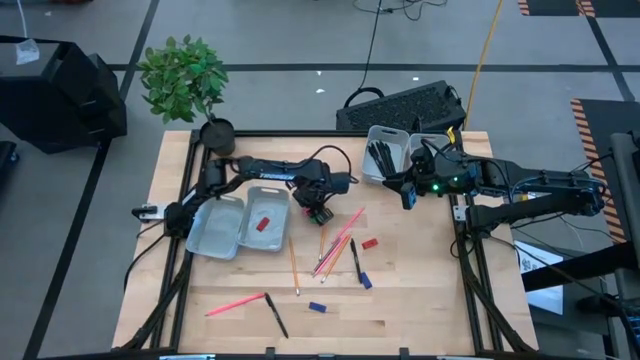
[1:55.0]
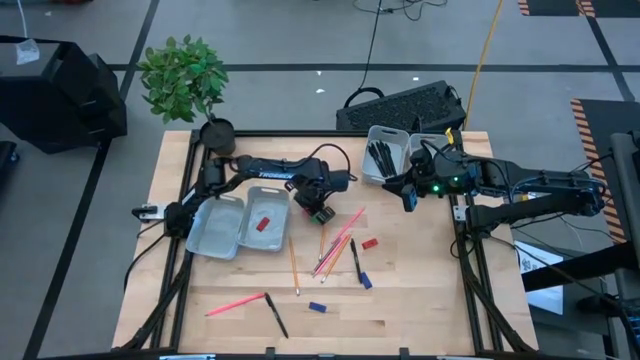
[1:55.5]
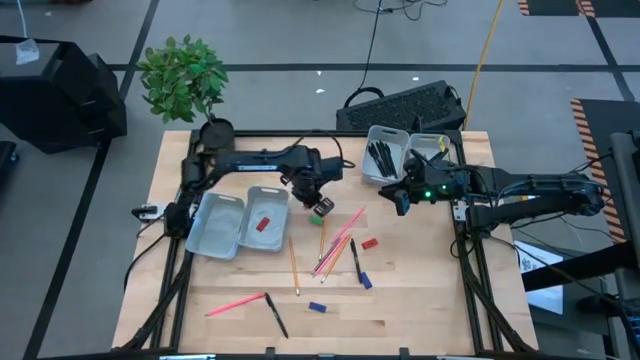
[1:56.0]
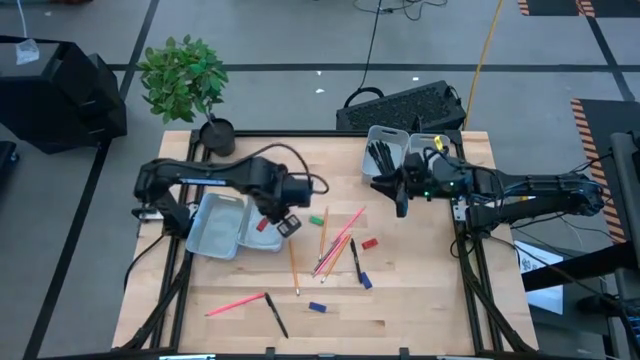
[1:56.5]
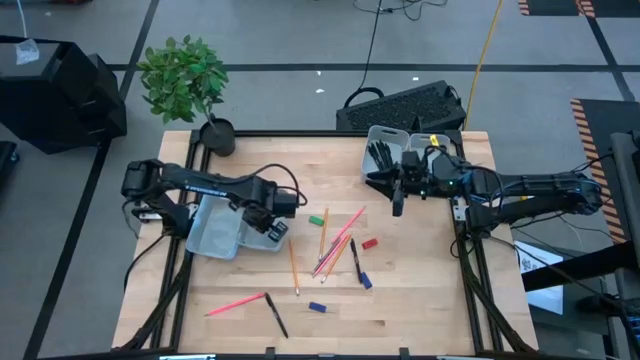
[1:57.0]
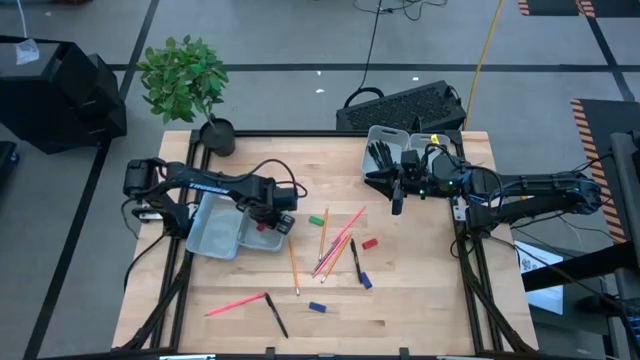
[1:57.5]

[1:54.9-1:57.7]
Task: Sort crayons/erasers/pens/pencils in bins
Put the pink eraser into the bottom right gray bin

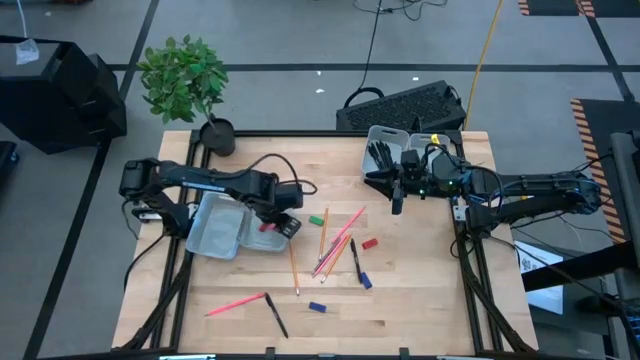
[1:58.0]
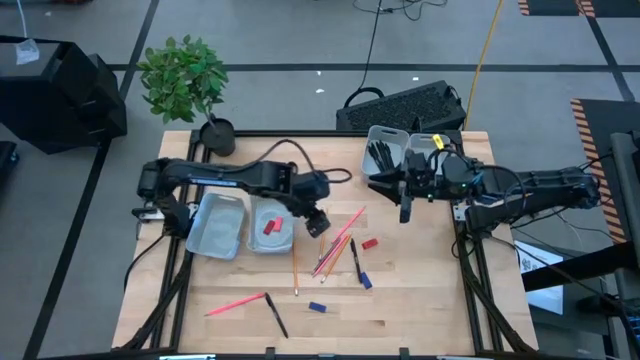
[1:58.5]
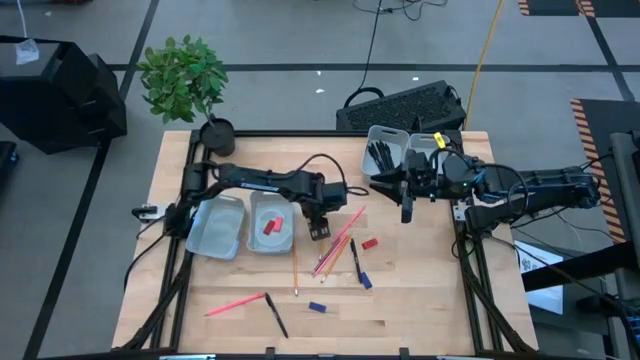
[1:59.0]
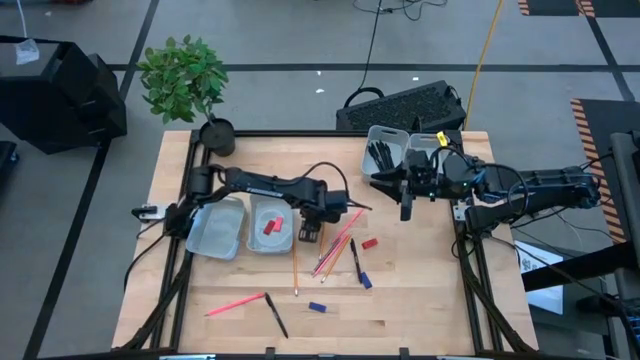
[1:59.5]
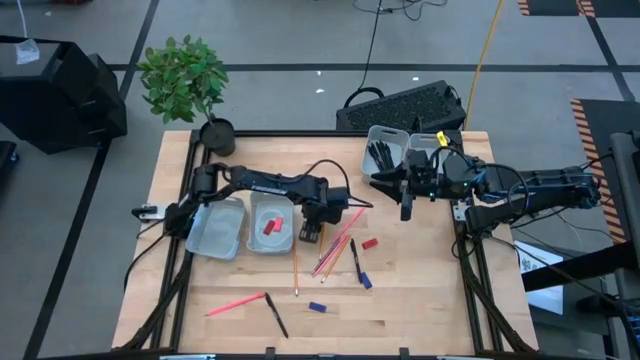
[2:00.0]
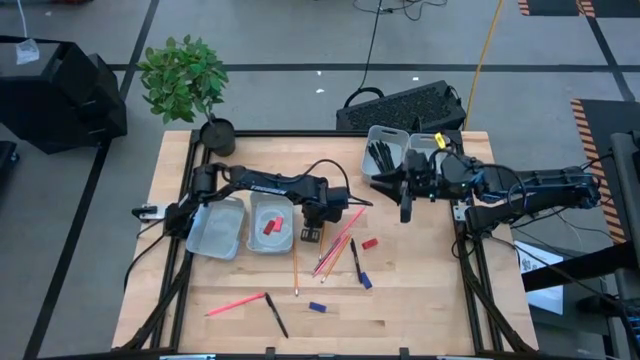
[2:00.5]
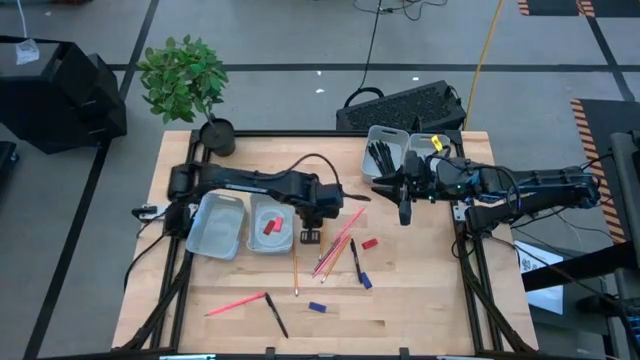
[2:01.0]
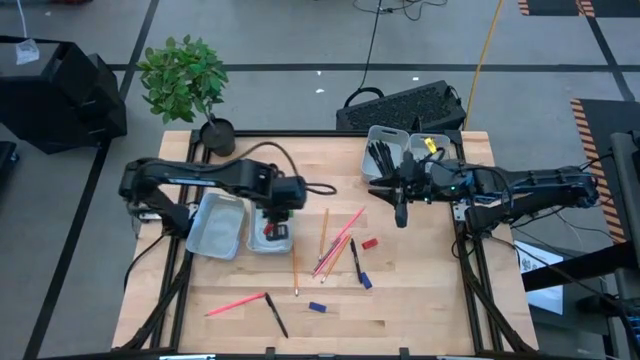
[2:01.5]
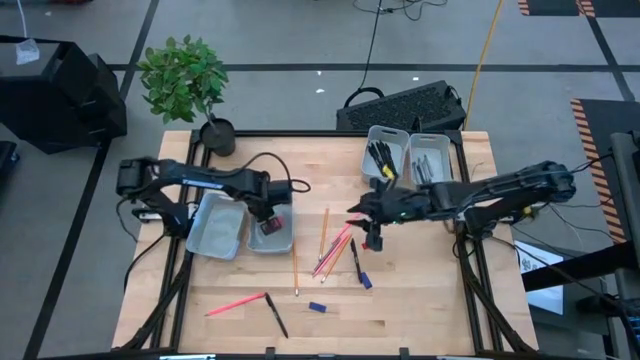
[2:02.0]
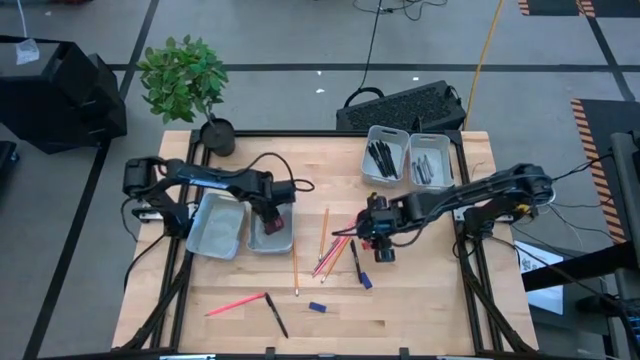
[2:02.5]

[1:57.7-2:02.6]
Put the green eraser into the bottom right gray bin

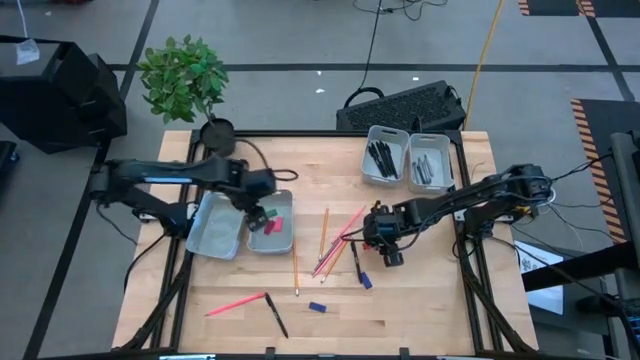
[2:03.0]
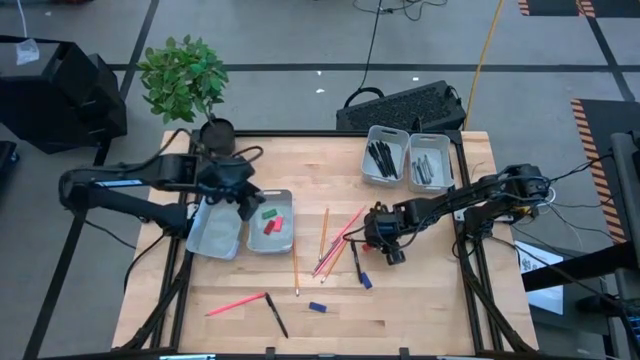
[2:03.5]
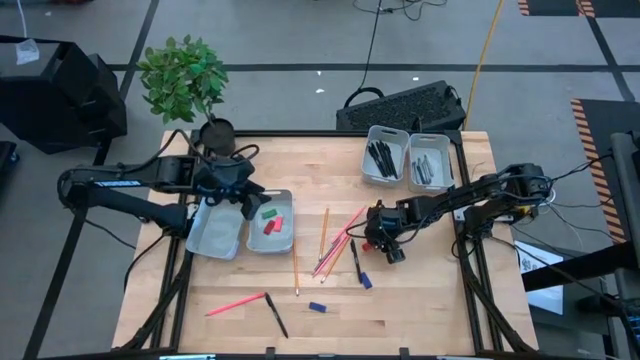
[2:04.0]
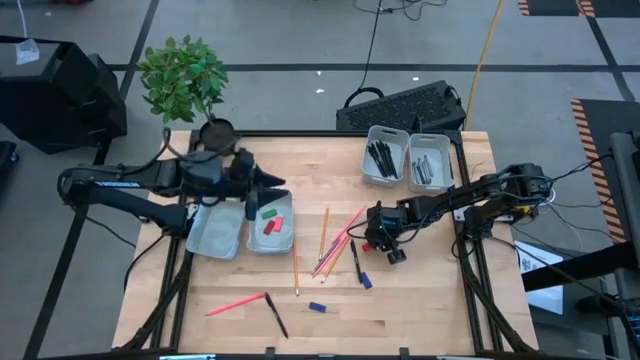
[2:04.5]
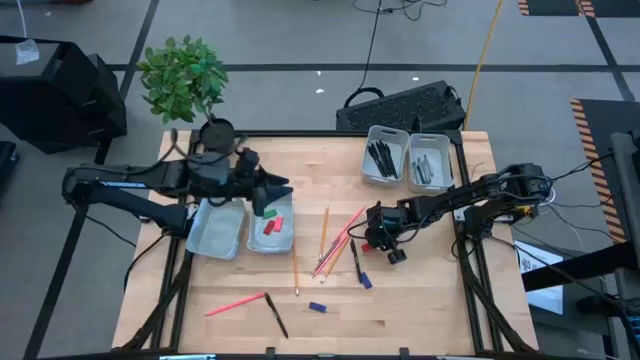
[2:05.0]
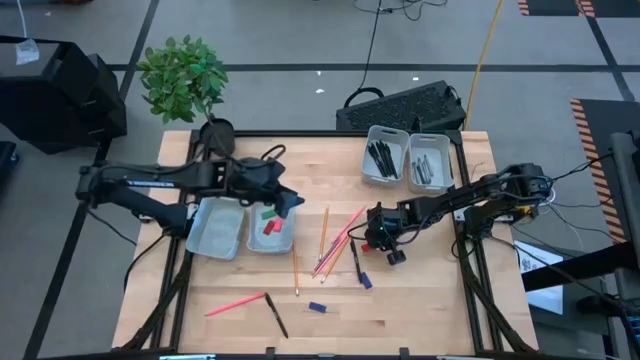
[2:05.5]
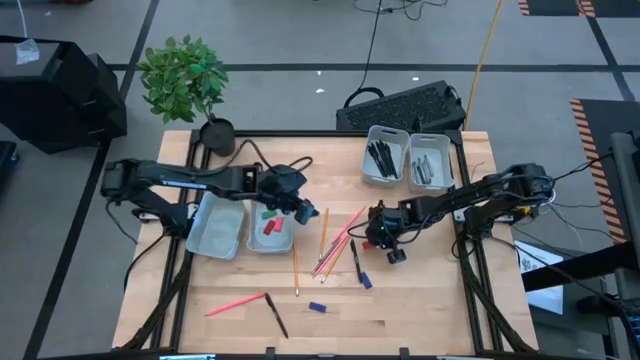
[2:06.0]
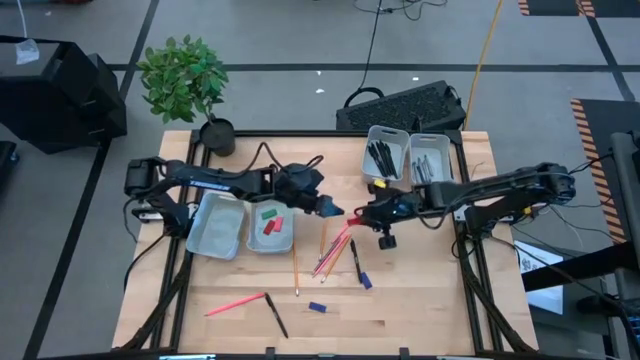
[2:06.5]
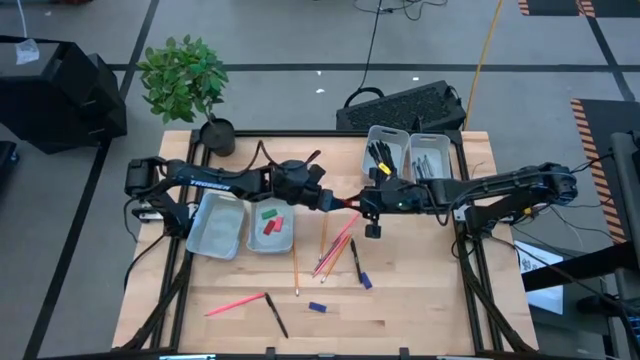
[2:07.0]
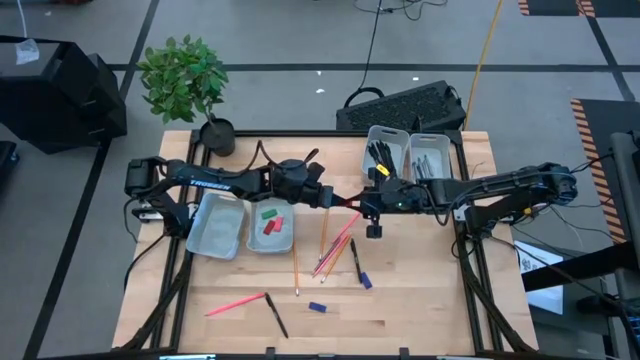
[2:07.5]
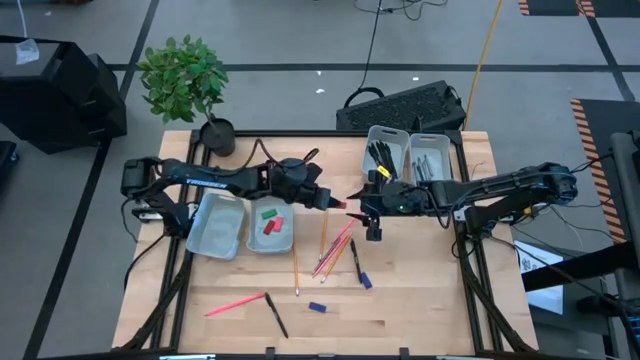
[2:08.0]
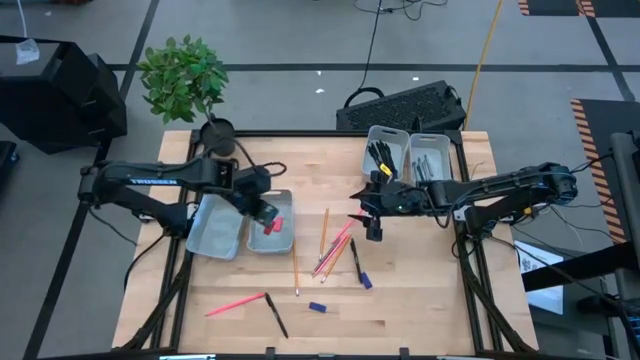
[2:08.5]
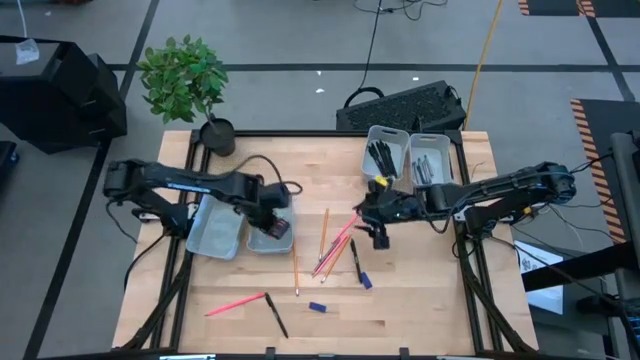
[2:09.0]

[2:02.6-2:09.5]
Put the red eraser into the bottom right gray bin

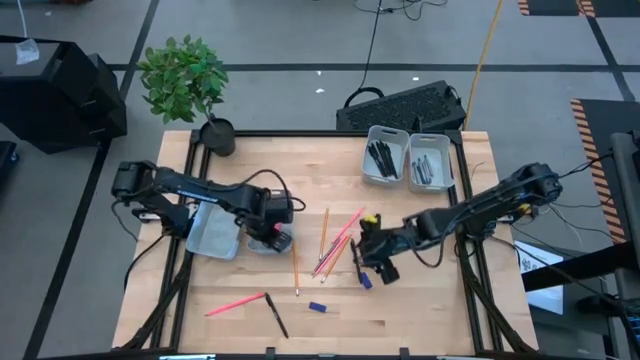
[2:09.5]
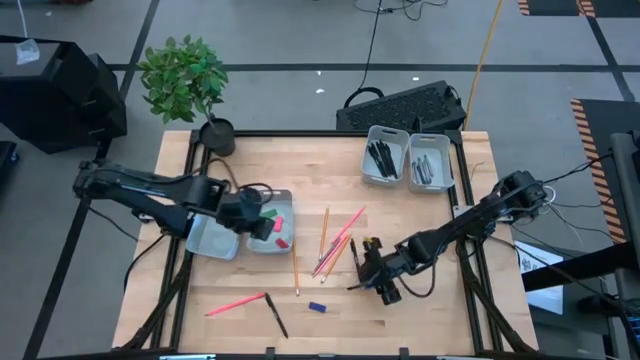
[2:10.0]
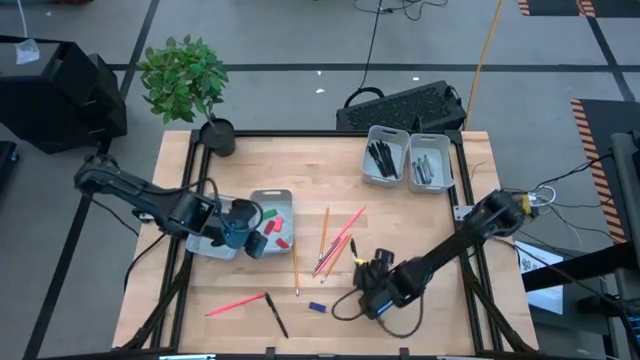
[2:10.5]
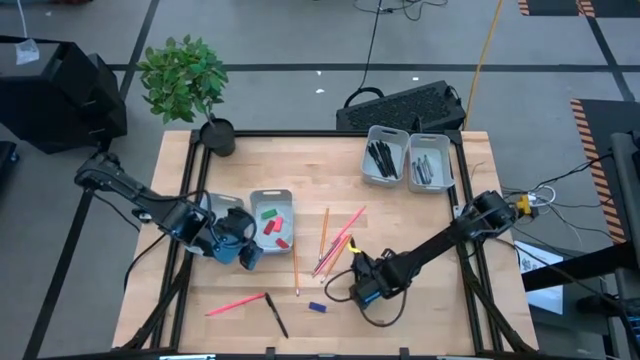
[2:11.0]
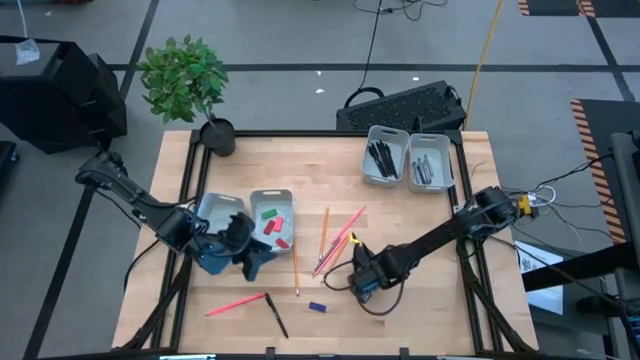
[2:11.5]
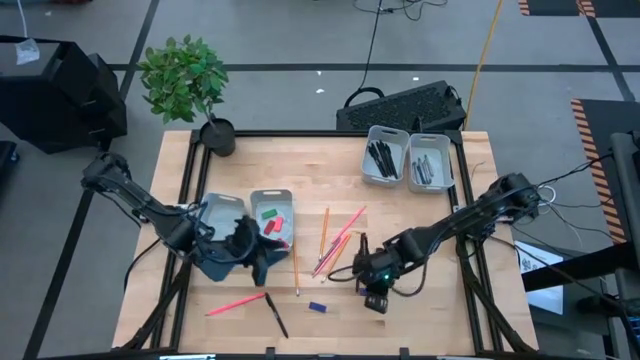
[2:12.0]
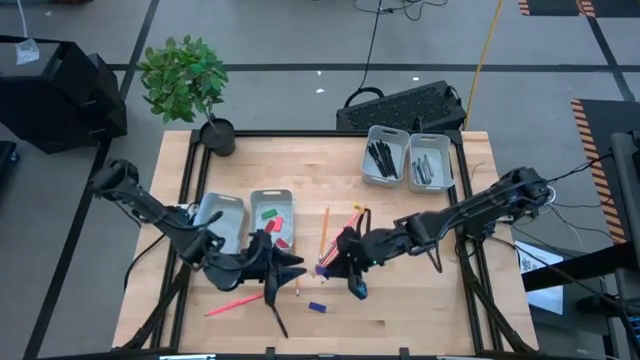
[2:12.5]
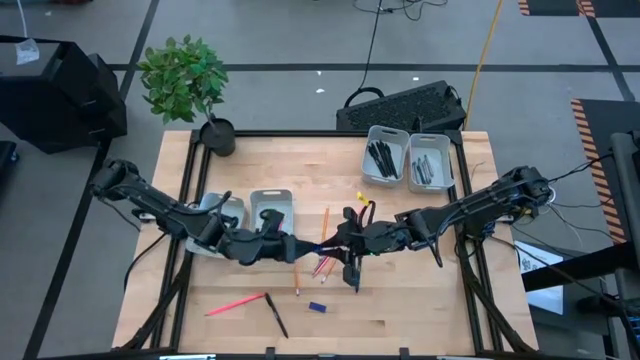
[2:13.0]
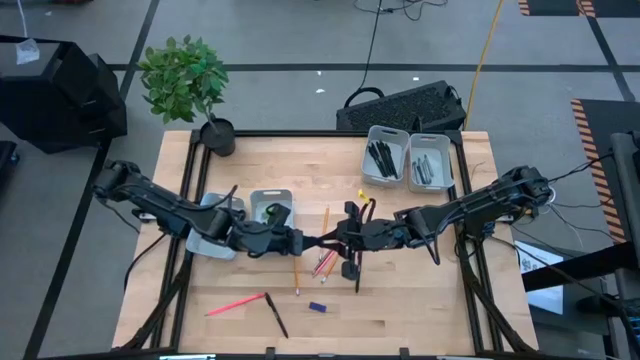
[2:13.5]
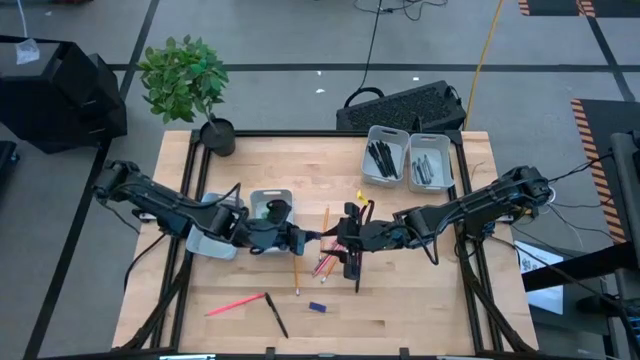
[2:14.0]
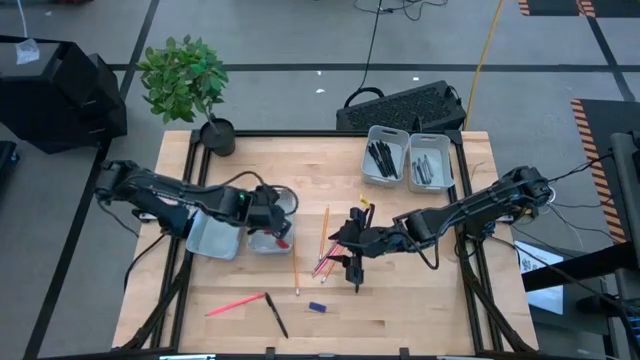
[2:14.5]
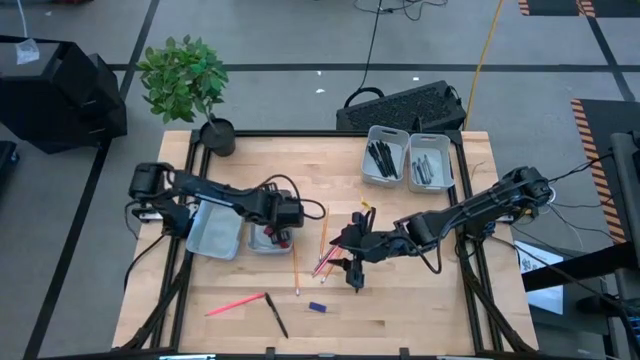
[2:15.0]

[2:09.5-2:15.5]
Put the blue eraser into the bottom right gray bin

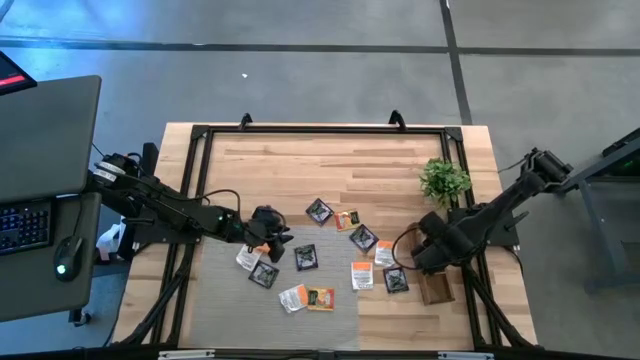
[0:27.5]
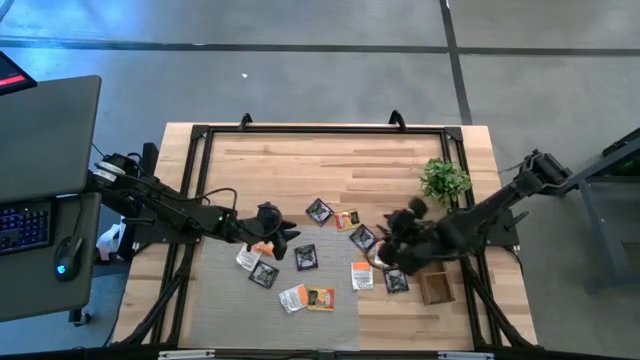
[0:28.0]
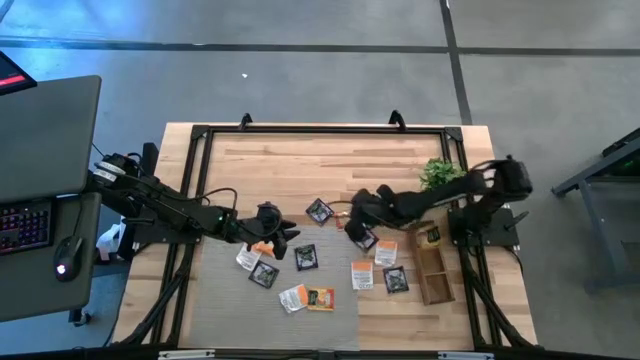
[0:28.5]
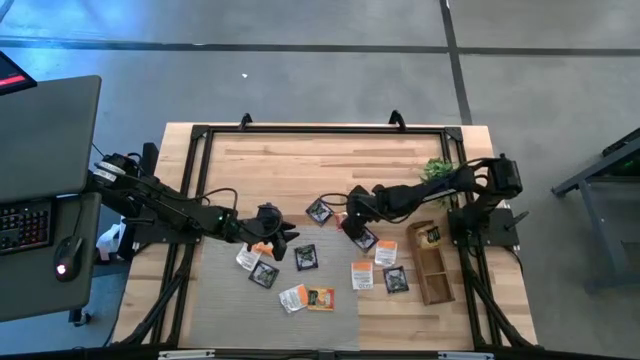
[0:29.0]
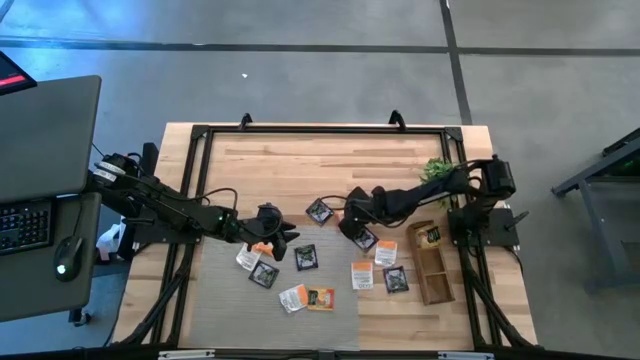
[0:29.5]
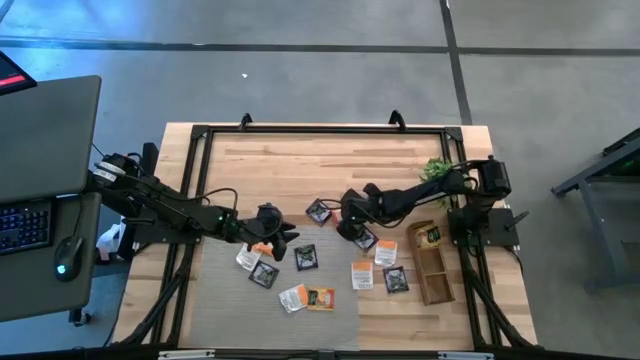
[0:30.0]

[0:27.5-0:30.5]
Task: Pick & Place Tea
Put the orange tea bag into the top section of the wooden organizer
